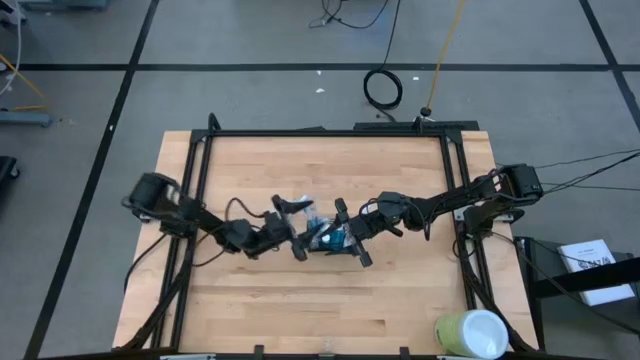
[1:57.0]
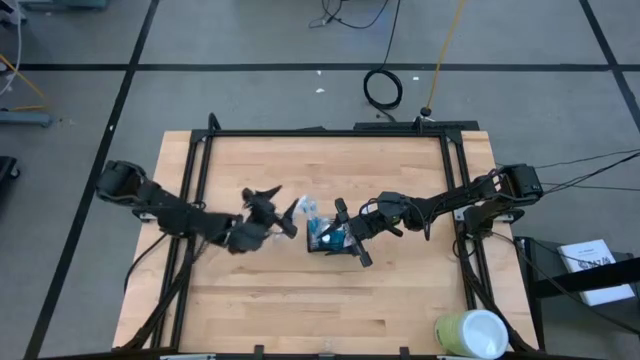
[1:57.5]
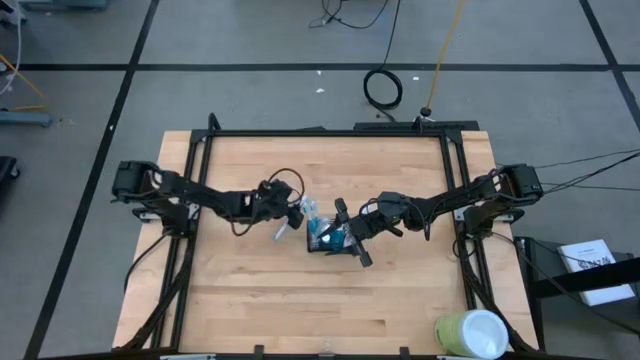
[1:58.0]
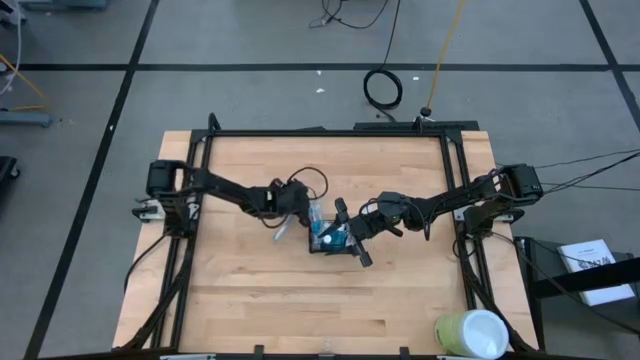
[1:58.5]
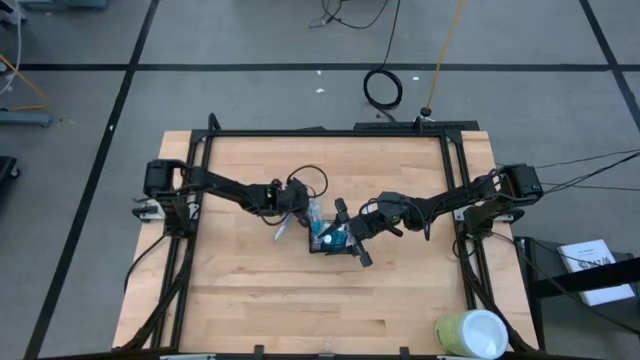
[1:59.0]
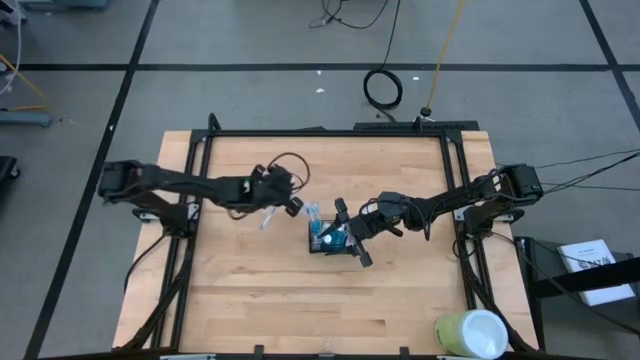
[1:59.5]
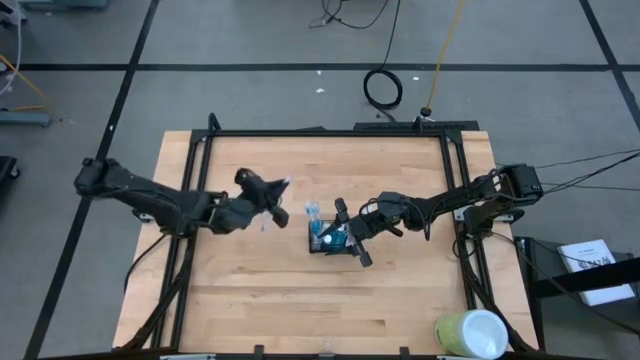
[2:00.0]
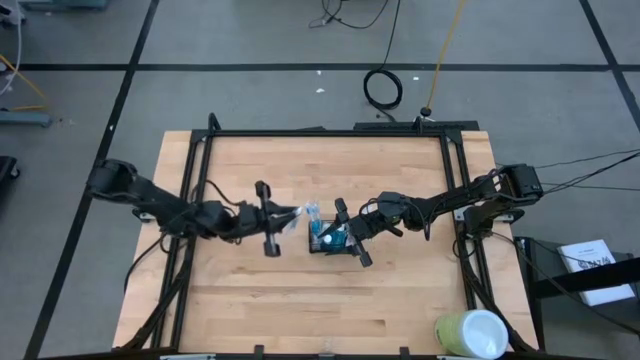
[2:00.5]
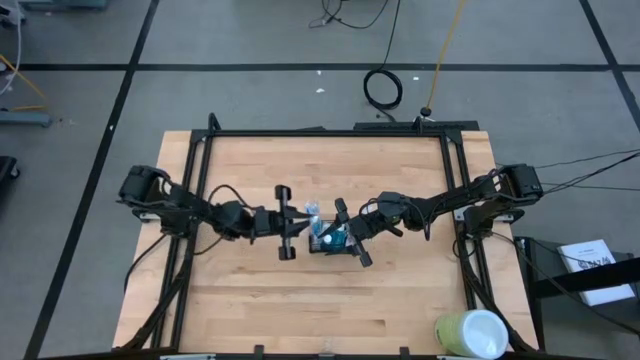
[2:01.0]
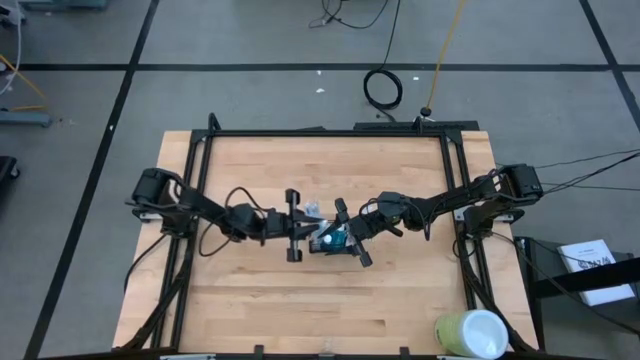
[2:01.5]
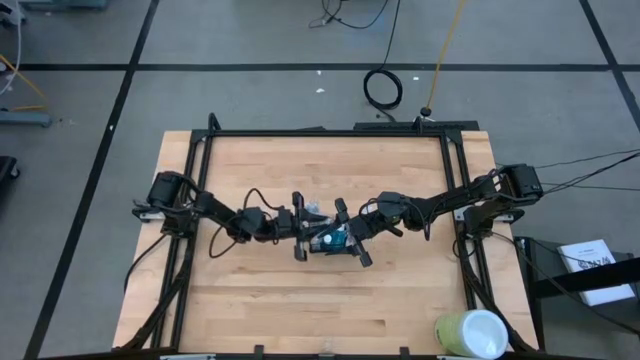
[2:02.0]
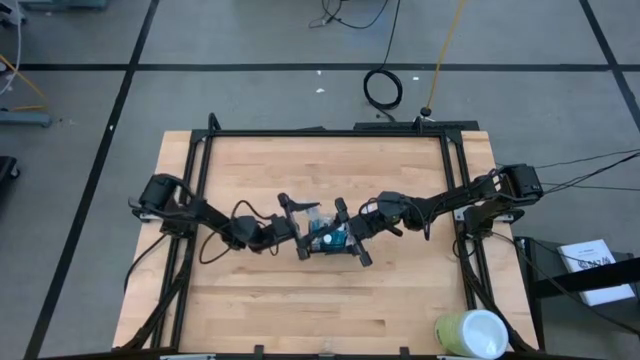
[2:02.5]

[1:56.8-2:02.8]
Task: Pick & Place toothbrushing station
Put the toothbrush into the left section of the wire organizer

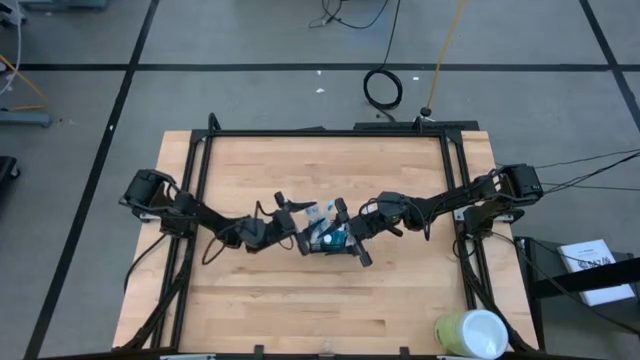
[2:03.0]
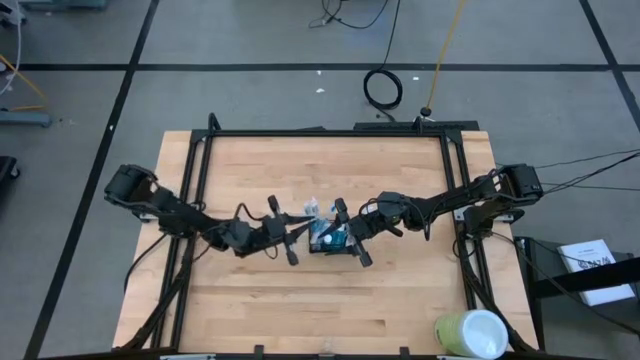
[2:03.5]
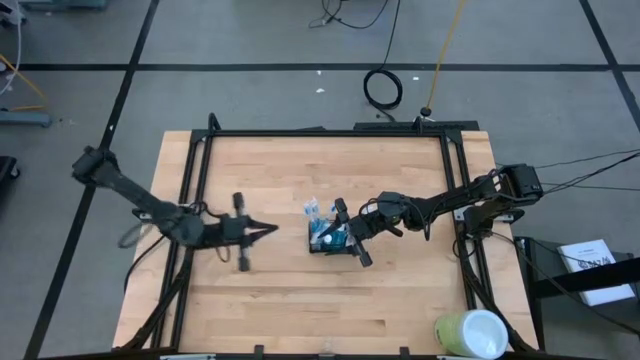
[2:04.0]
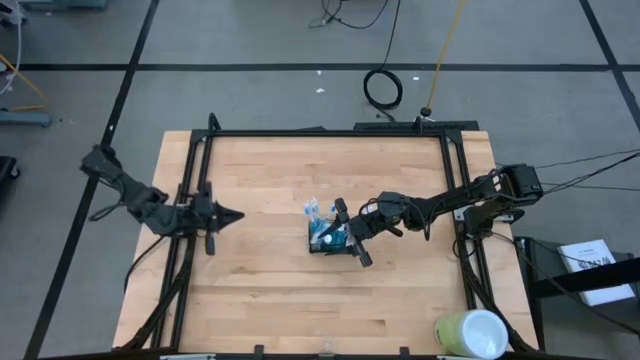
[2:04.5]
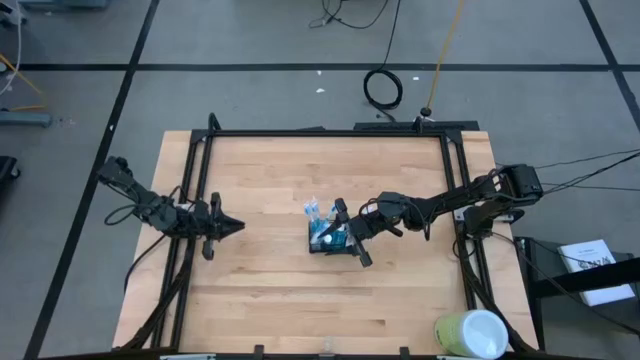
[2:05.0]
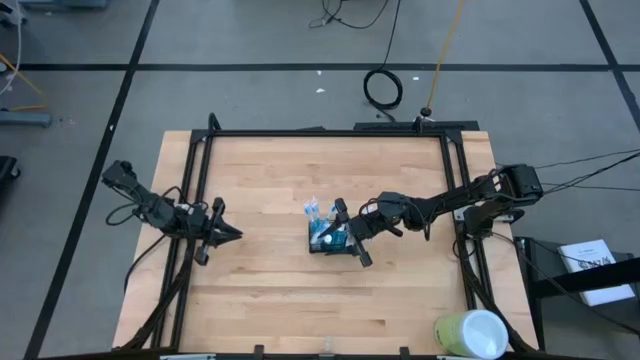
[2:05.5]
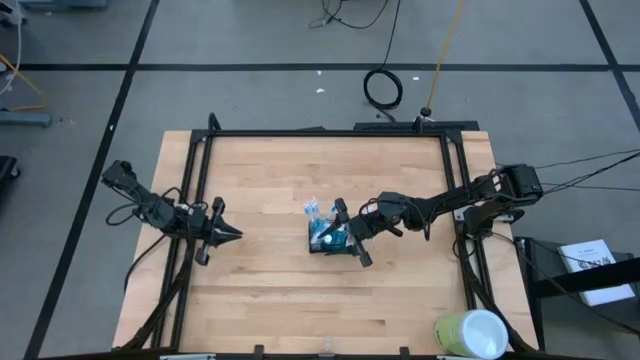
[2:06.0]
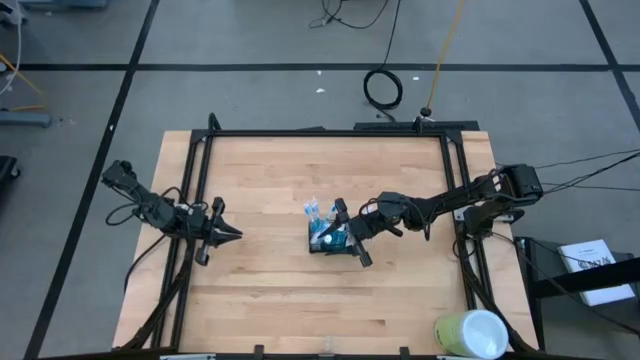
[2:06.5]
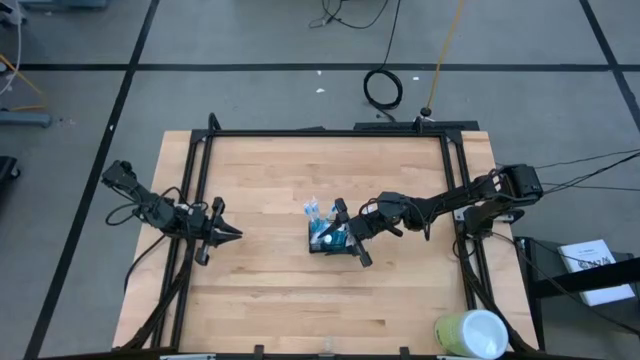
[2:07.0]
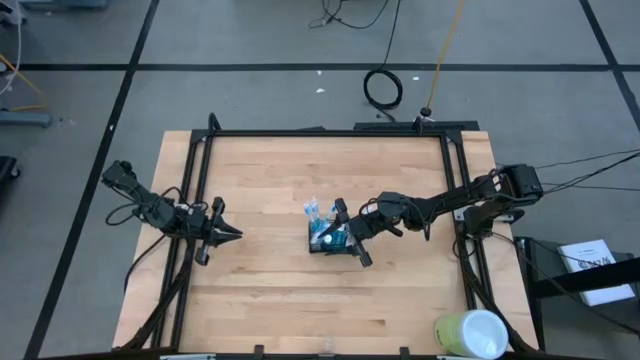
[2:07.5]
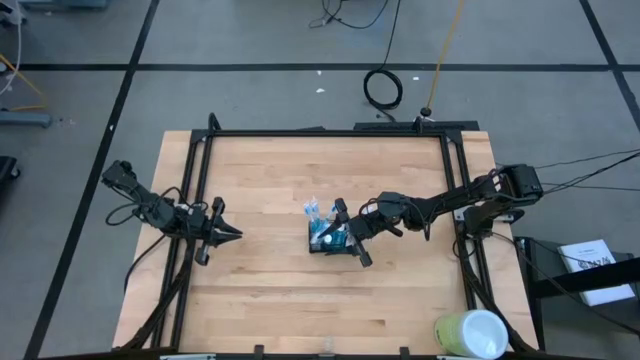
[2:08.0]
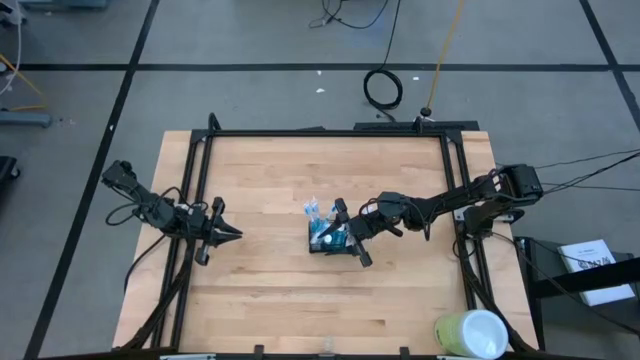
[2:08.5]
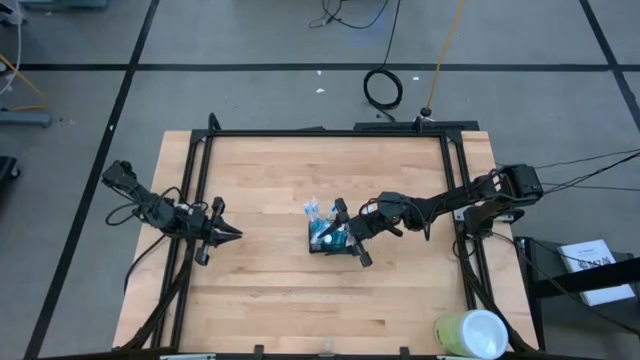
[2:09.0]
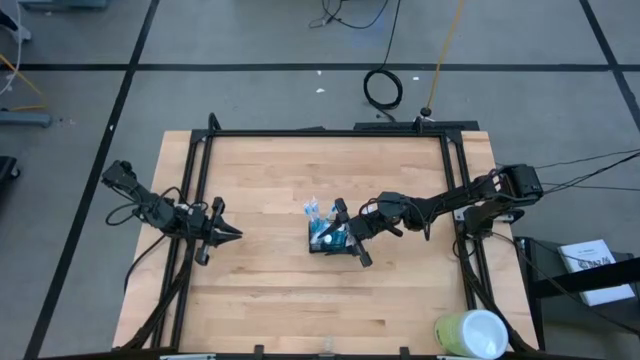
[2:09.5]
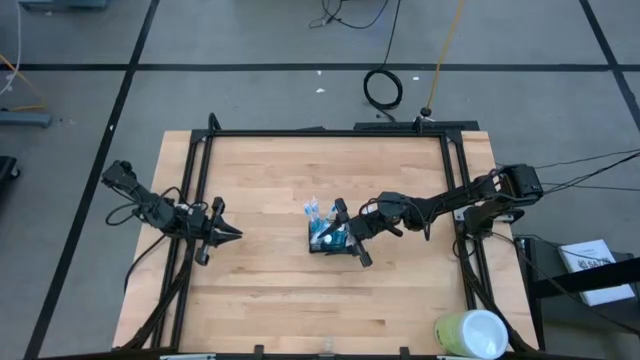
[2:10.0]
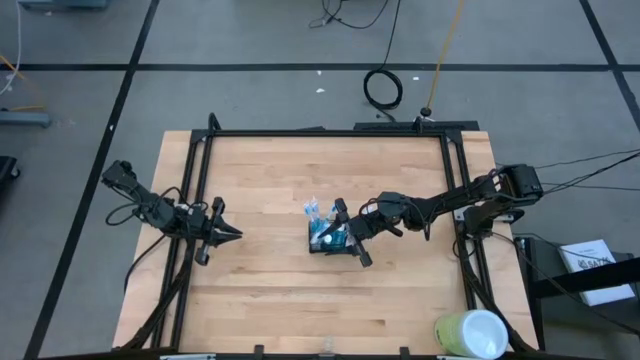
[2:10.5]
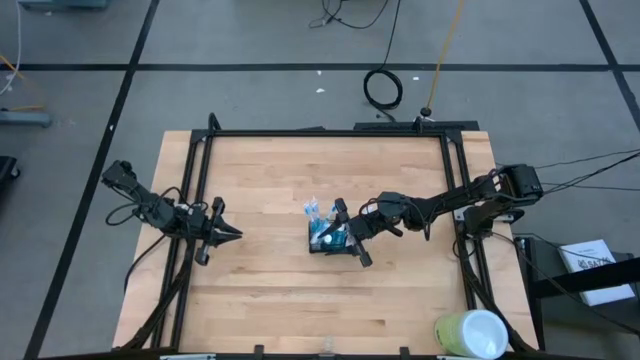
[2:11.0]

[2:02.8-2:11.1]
Return to Home Position

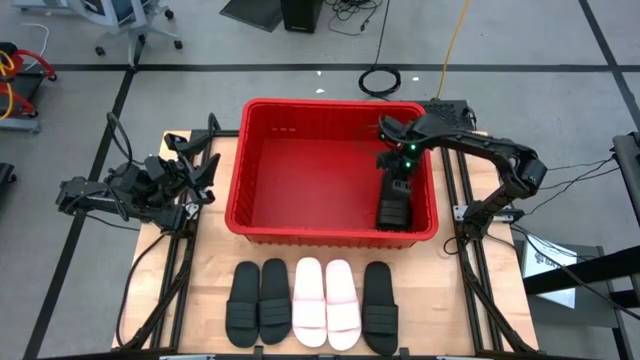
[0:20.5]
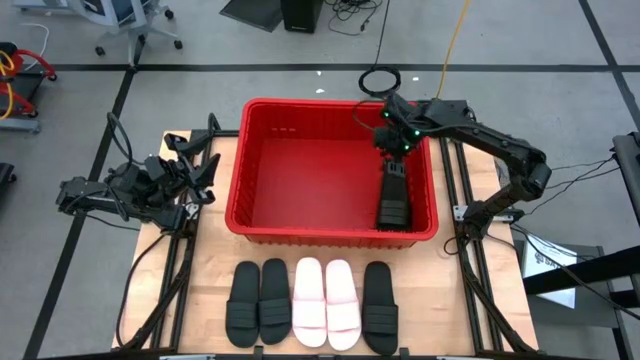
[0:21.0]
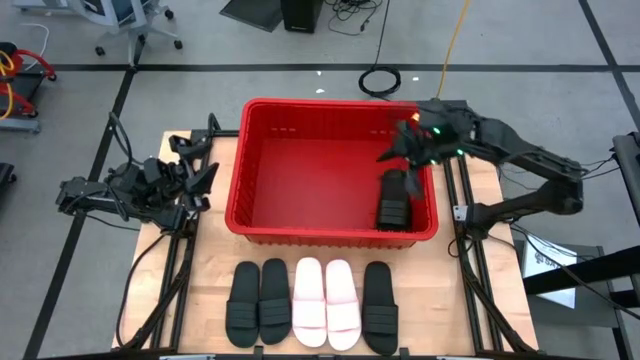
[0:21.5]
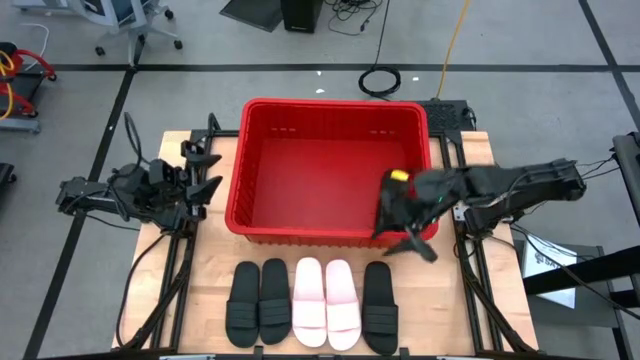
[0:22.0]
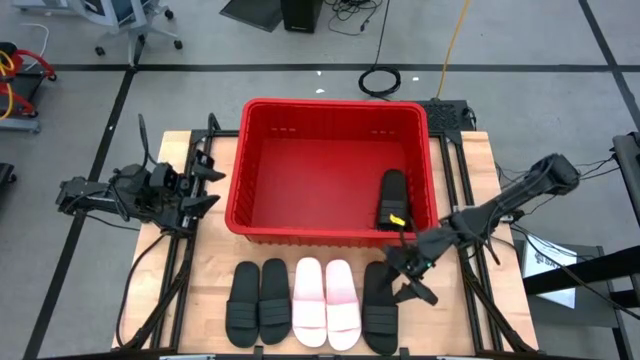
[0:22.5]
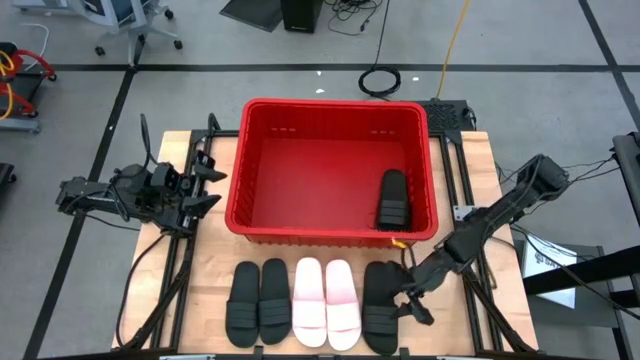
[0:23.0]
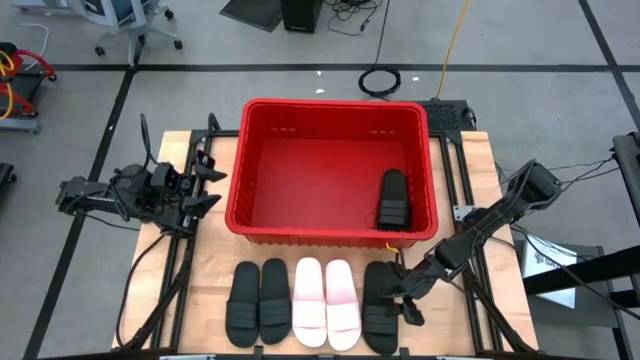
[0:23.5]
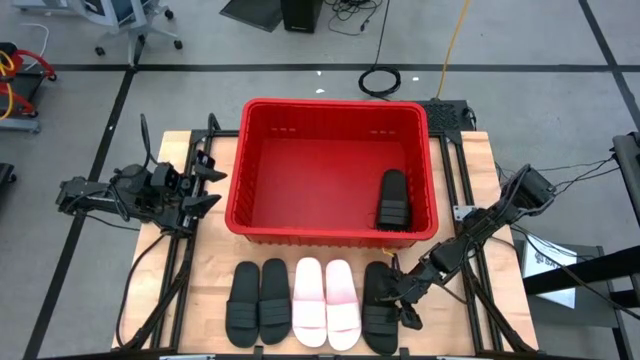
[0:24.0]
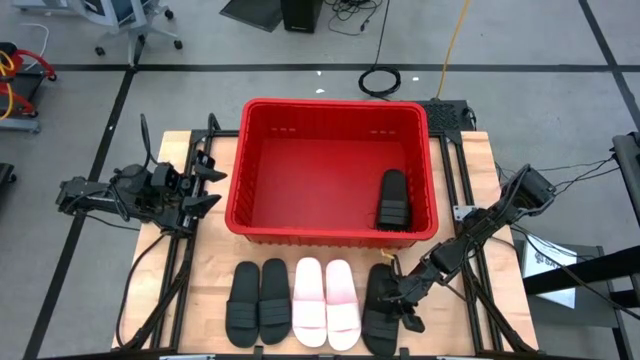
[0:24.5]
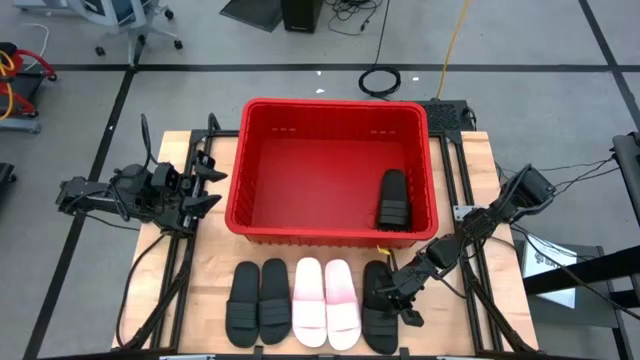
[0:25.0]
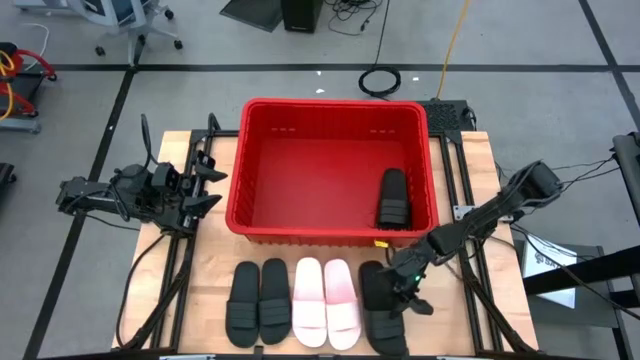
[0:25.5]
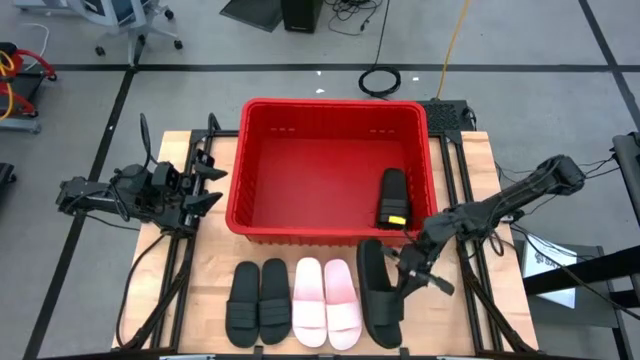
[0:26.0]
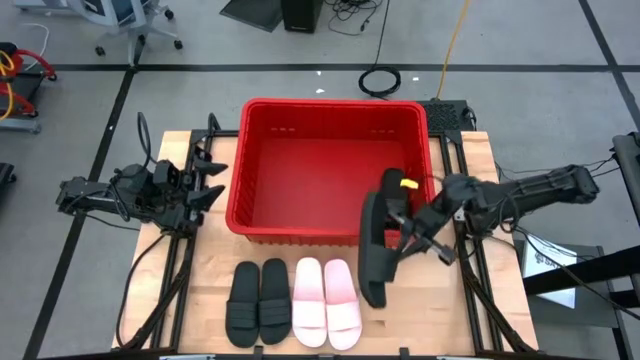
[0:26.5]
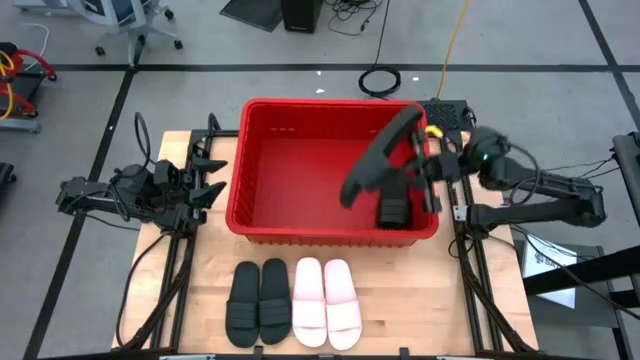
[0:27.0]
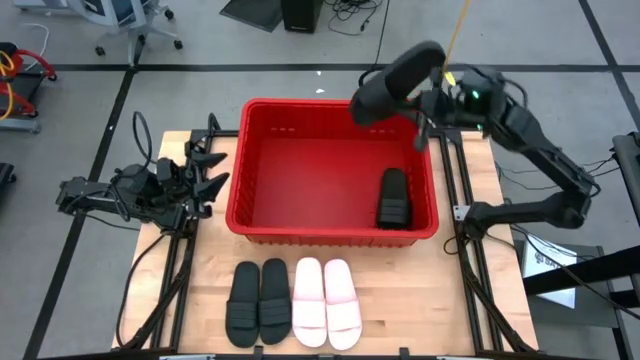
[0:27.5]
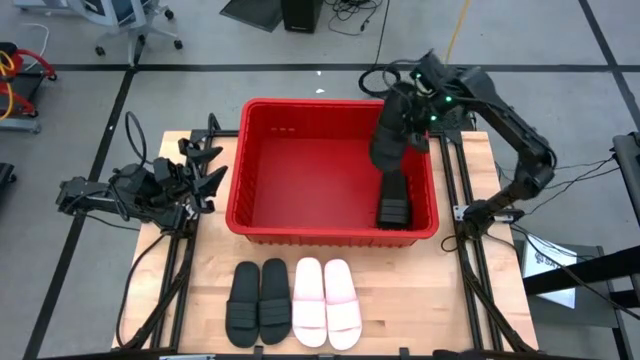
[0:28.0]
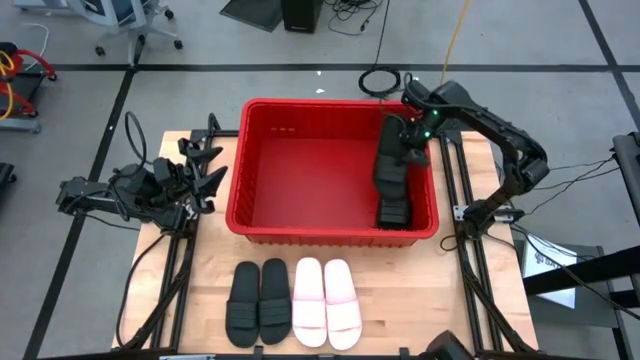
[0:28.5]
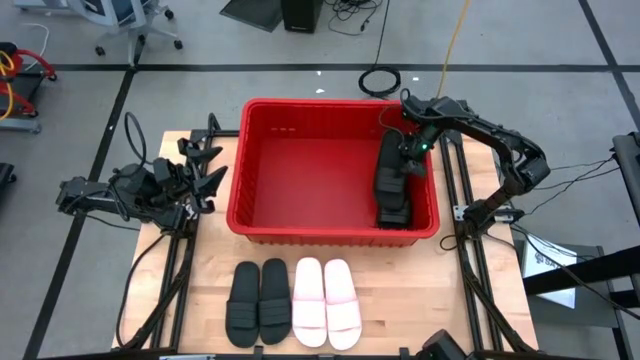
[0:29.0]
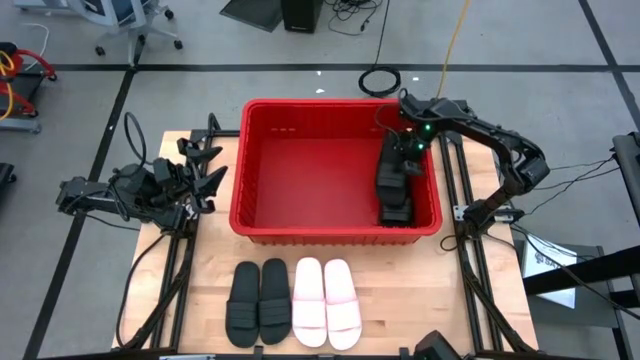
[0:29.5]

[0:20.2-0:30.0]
Task: Pick and place slides into bin
Put the right black slide into the red bin
